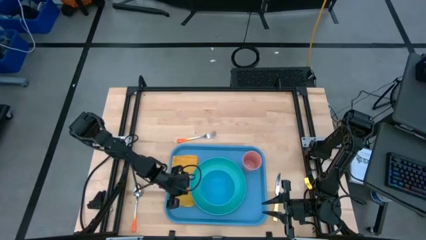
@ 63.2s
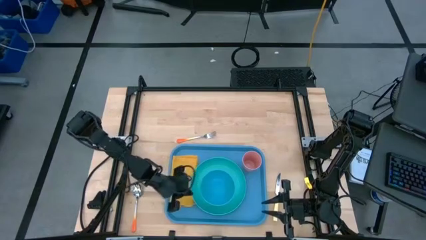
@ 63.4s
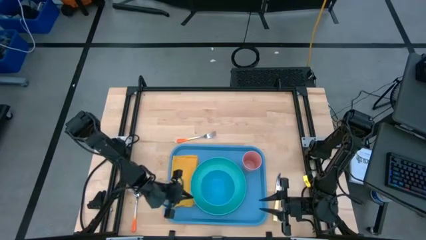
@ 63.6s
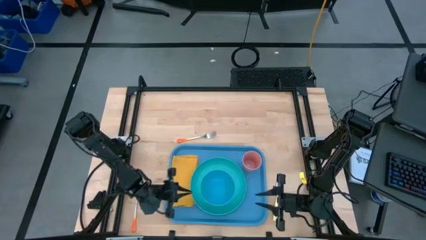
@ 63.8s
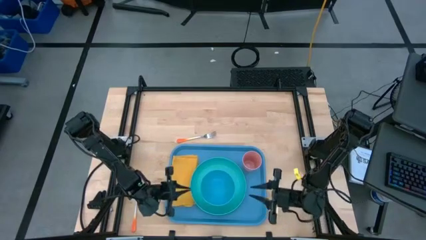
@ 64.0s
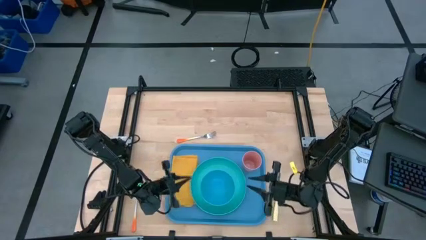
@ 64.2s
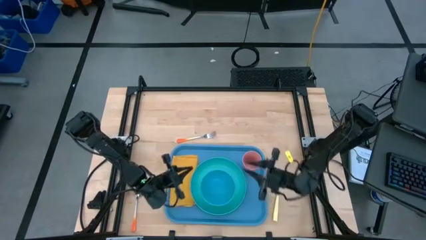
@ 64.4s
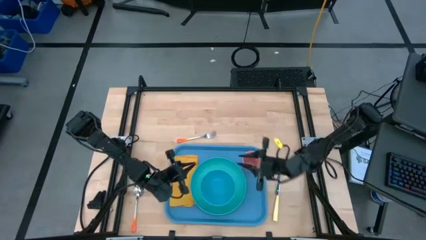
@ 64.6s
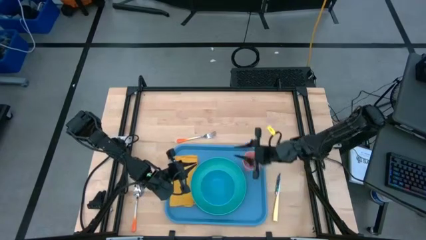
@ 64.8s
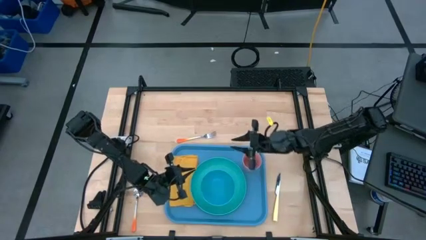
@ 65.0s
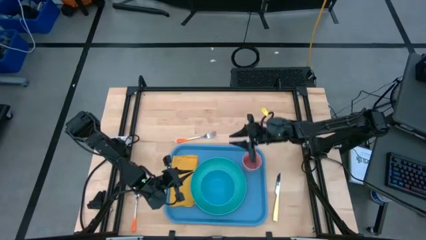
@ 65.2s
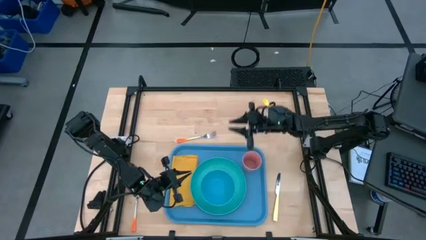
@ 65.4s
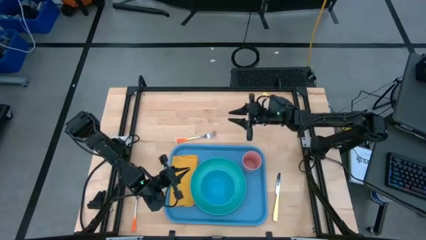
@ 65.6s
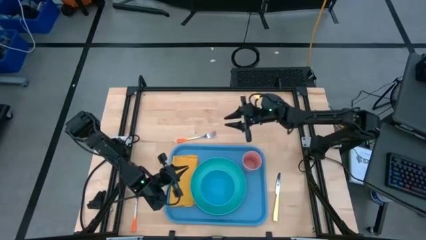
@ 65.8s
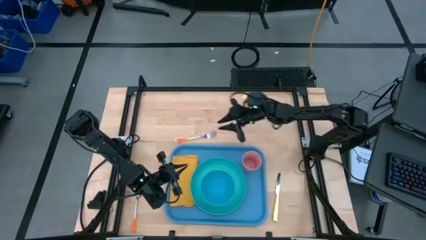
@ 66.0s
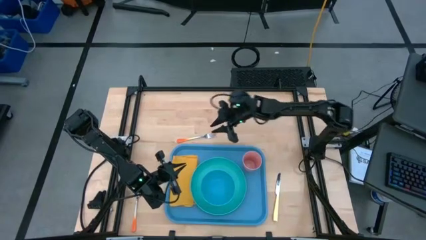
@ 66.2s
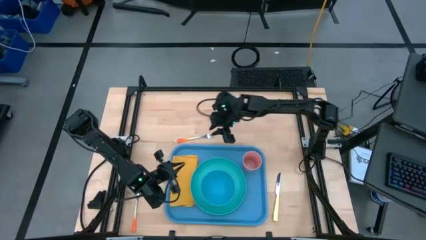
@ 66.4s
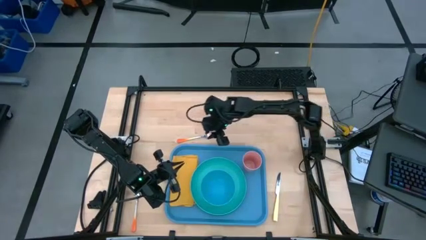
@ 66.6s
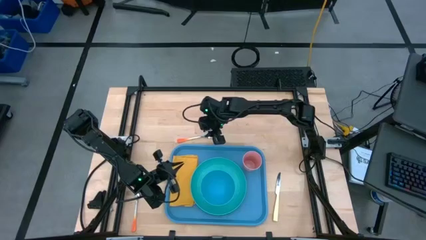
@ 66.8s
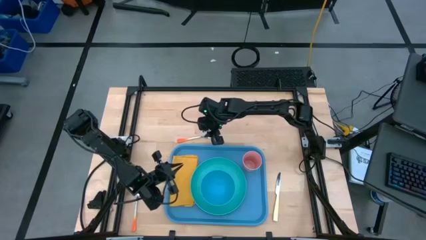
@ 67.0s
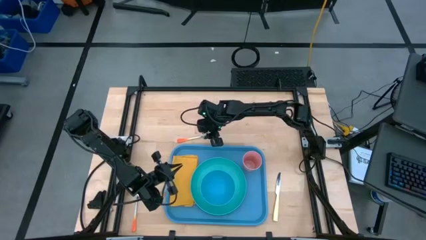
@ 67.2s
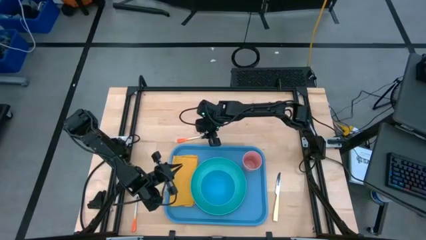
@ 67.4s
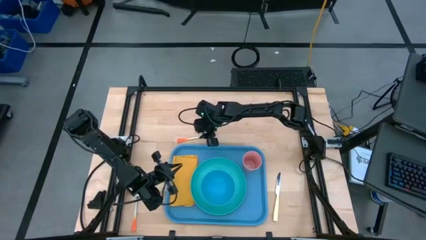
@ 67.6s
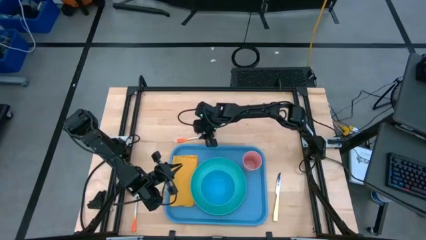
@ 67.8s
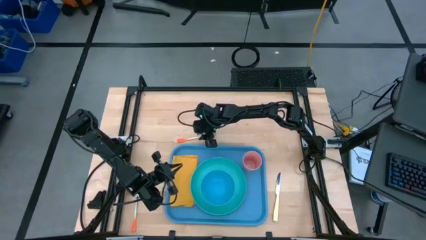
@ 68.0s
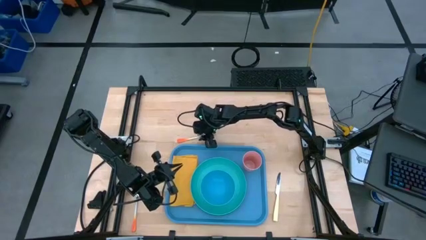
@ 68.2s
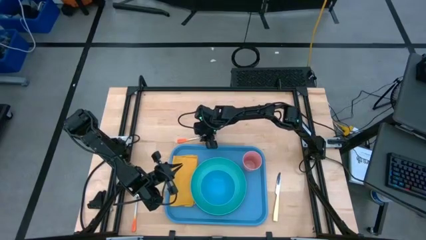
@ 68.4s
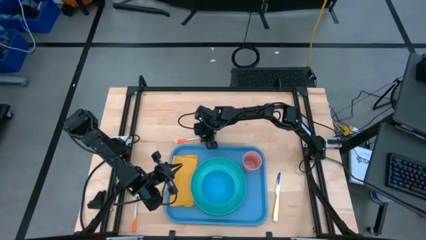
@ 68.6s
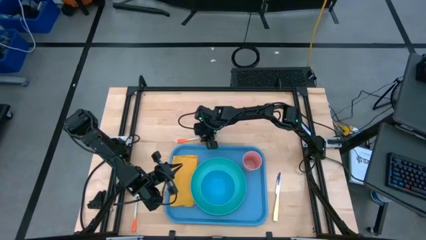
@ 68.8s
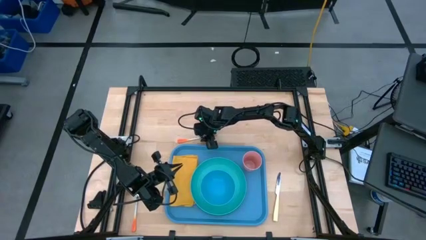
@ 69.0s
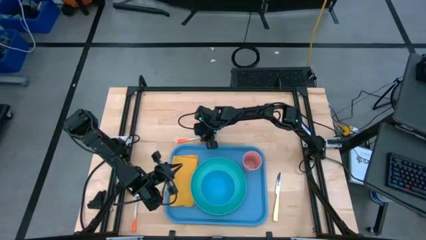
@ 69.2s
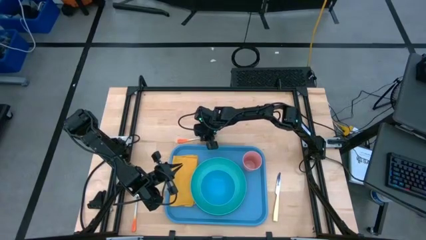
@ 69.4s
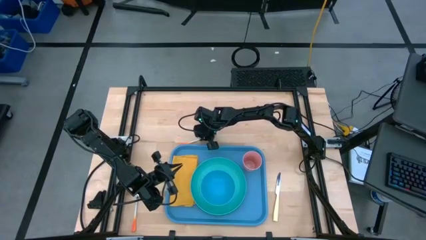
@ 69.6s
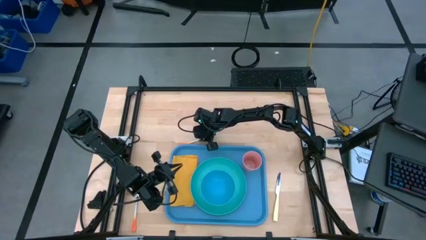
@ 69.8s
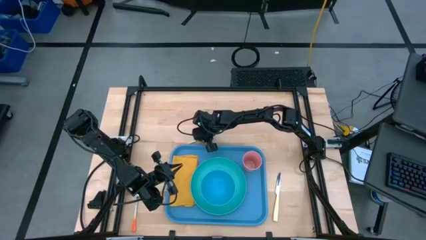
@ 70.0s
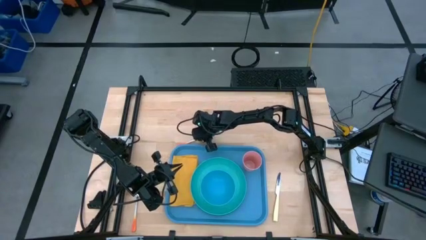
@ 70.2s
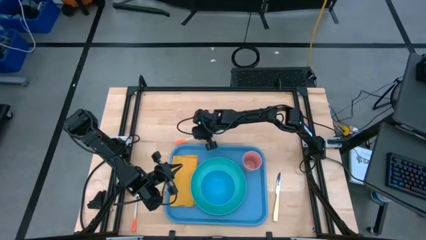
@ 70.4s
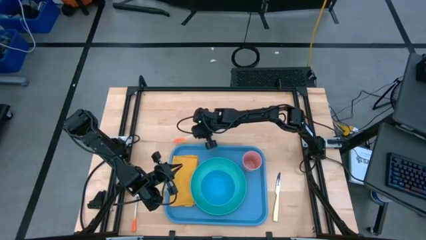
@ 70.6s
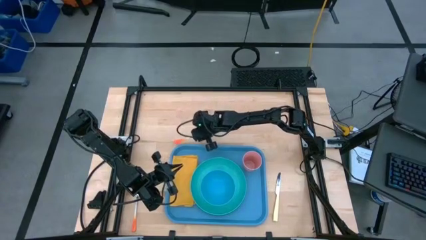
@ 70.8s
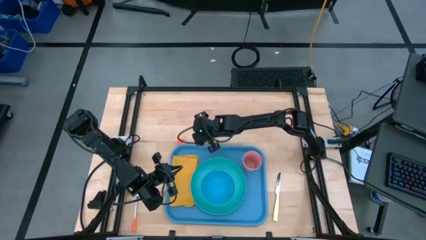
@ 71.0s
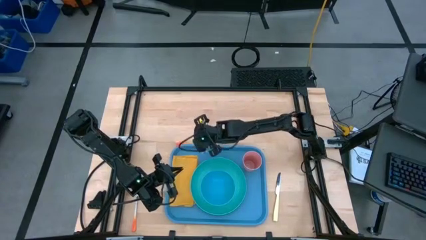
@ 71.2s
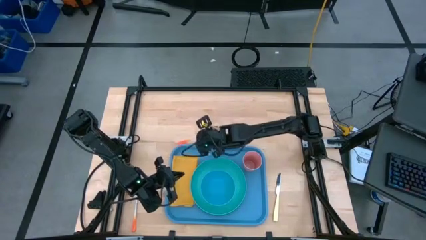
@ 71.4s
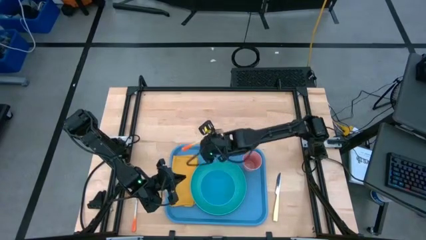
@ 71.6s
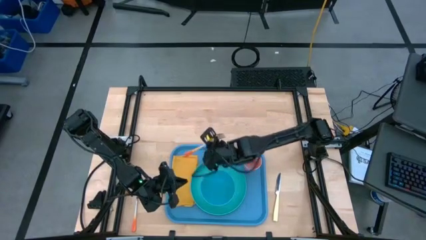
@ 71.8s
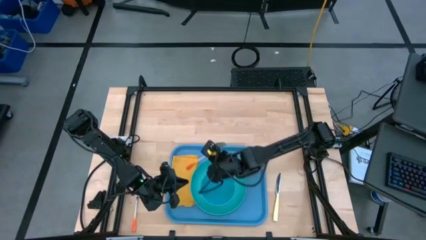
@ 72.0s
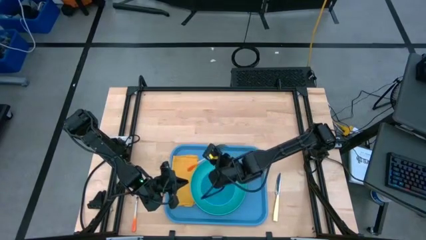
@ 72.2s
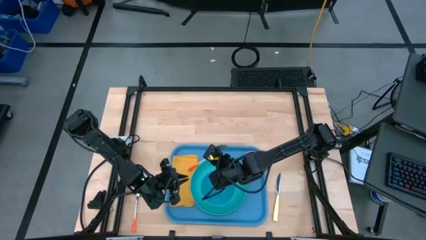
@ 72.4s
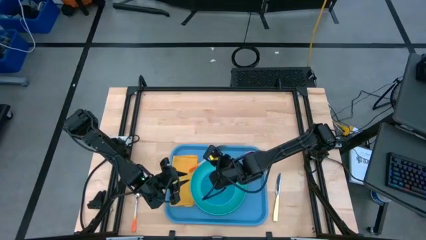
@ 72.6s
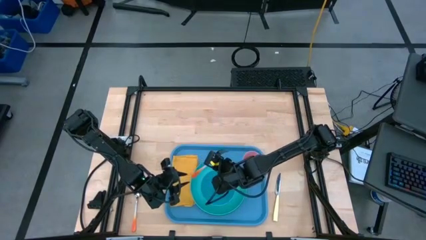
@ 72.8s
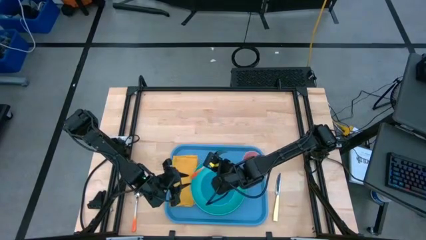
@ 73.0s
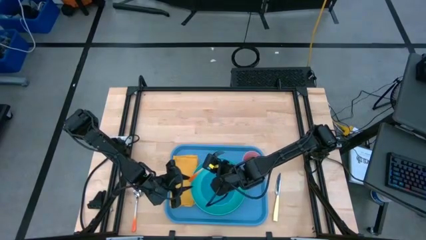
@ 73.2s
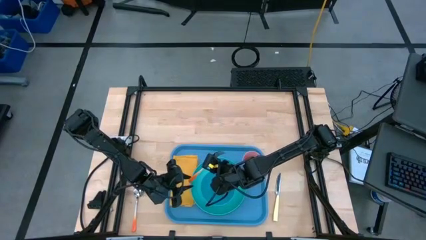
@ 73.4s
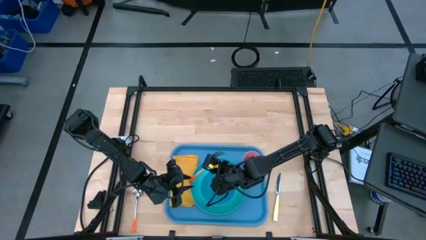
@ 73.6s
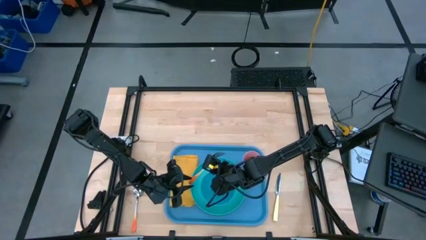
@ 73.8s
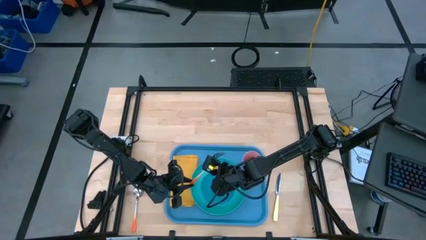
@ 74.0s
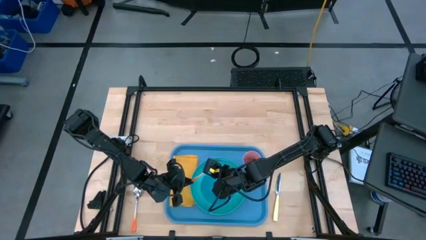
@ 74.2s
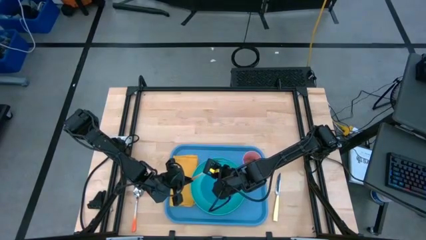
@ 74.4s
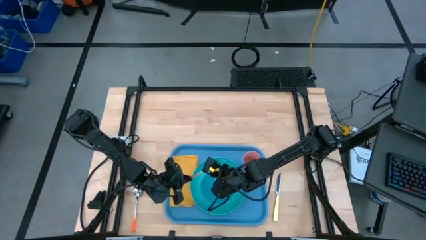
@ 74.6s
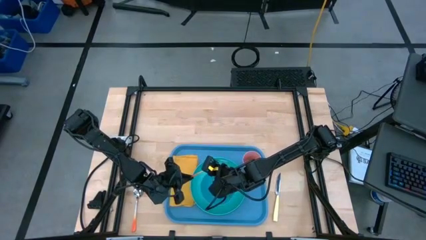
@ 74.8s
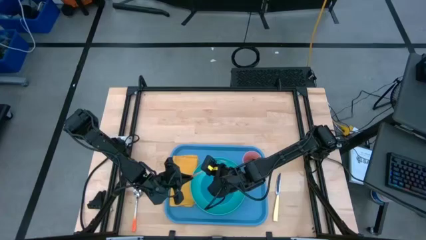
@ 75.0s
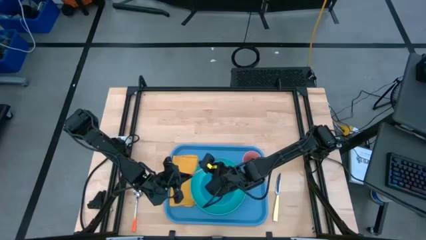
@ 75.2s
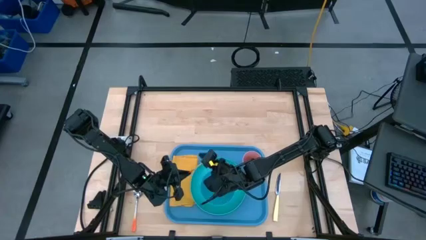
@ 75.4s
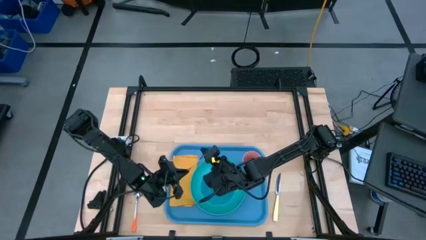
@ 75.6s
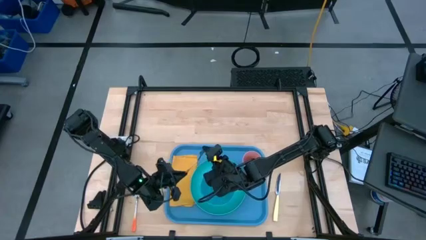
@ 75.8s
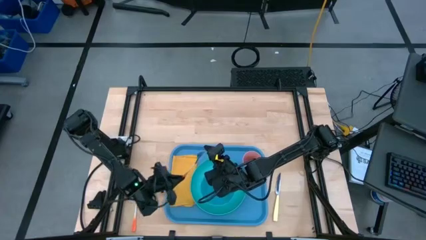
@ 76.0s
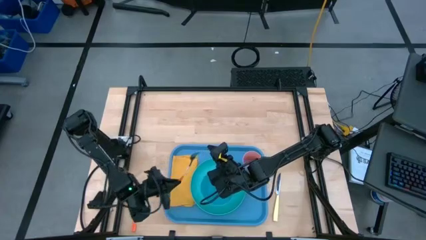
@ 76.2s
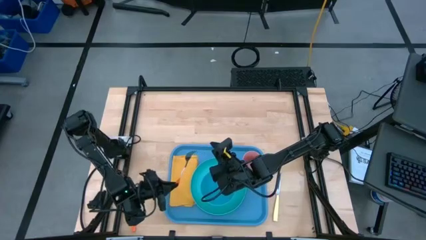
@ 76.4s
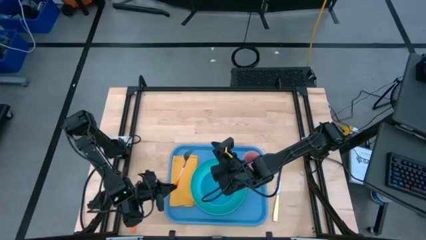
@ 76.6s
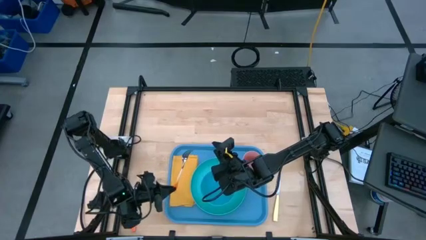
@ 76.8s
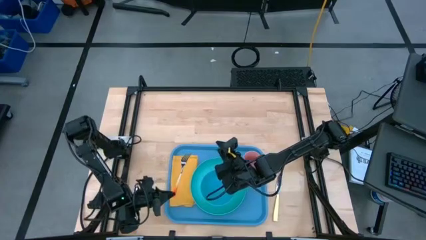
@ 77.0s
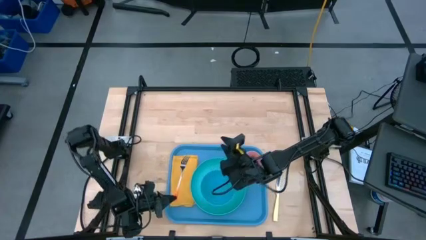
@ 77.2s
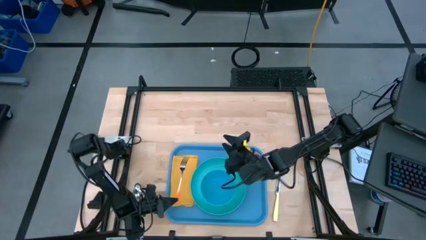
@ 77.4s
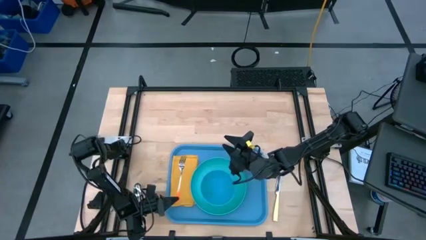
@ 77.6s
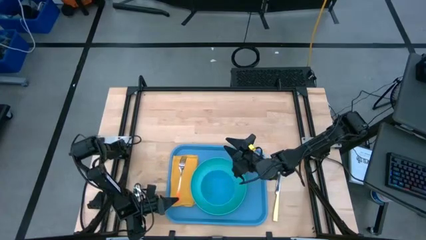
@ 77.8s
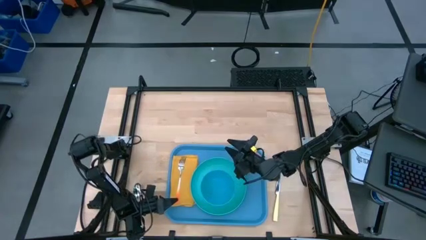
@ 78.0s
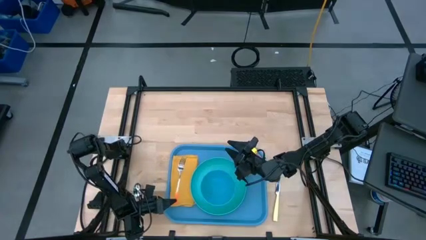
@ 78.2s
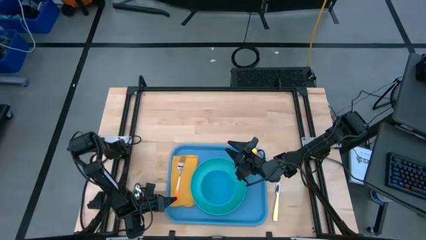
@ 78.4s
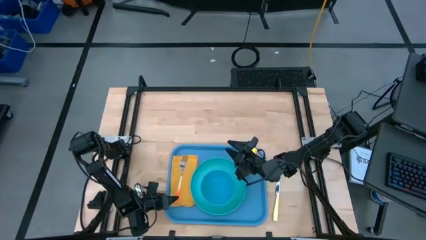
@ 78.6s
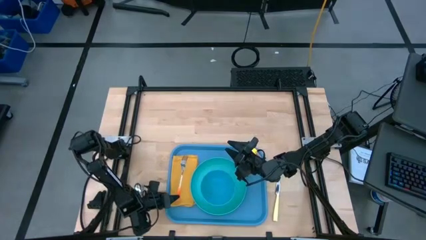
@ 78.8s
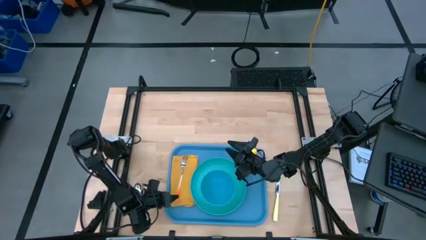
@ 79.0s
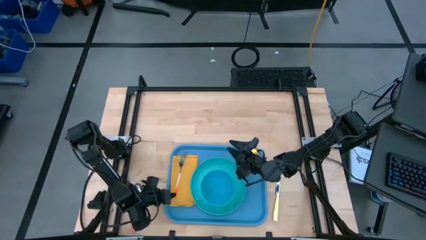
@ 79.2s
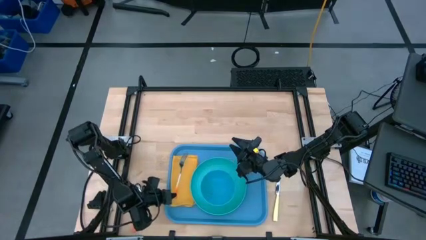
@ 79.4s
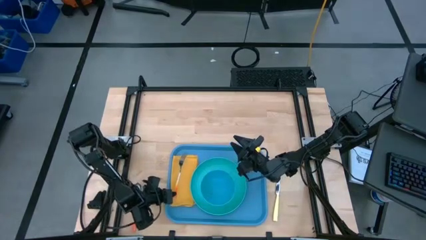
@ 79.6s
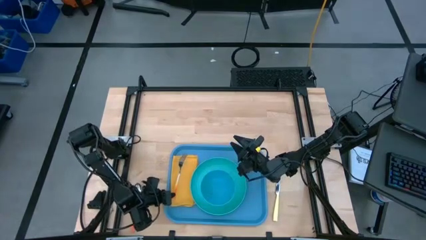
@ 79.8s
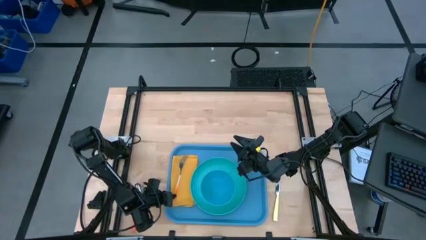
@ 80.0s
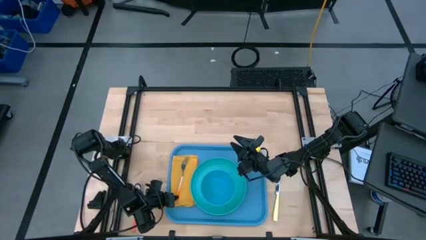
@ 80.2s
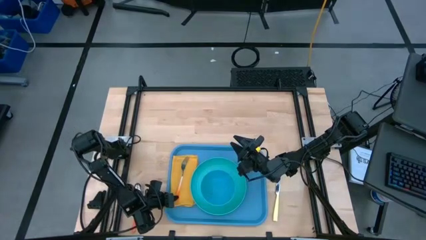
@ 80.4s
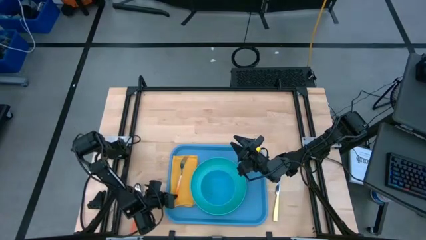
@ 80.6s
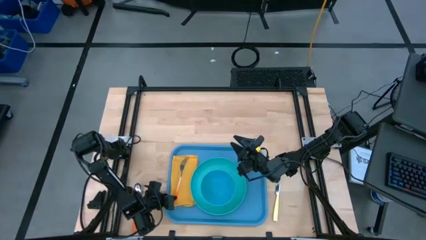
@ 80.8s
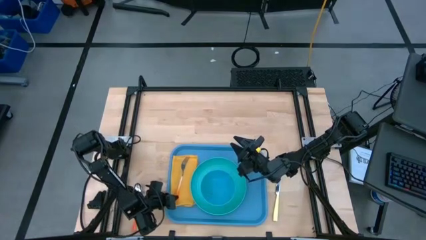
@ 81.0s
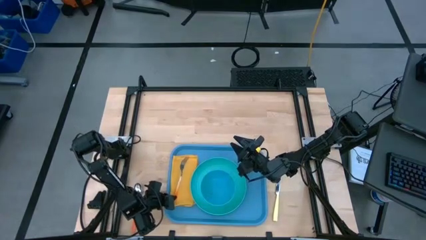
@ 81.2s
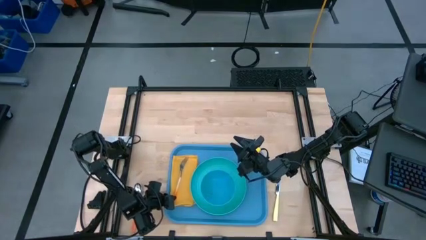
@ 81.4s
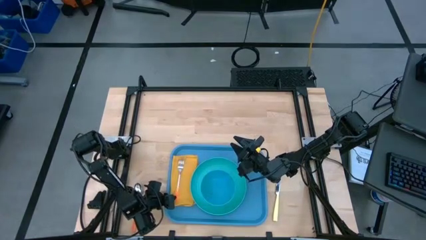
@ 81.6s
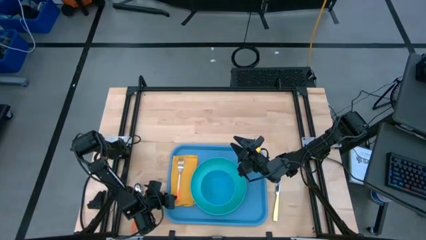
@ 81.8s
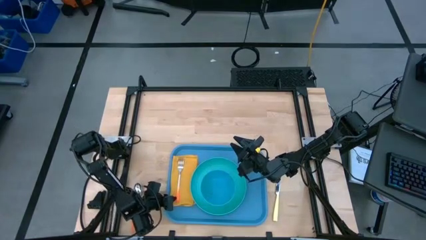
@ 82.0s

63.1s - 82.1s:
Task: Set up tray
Put the orange fork on top of the yellow napkin to the left of the light blue plate
